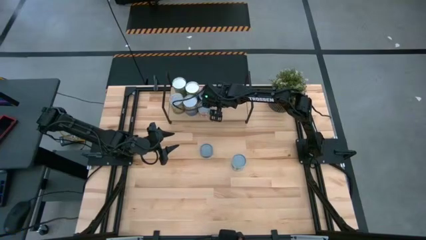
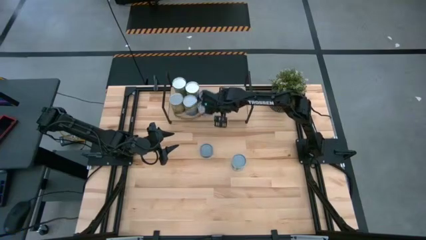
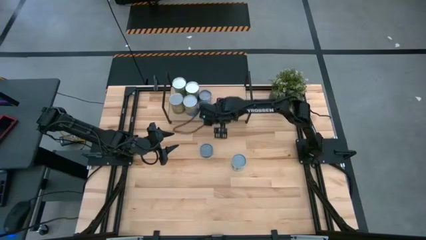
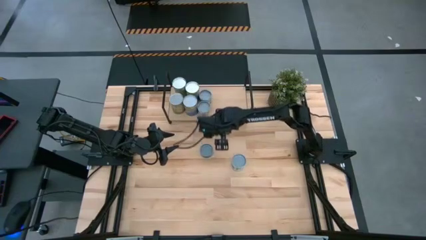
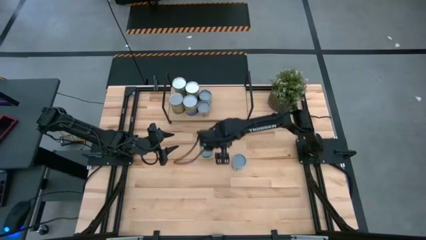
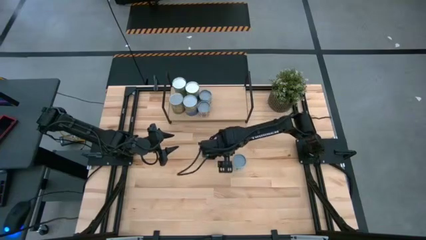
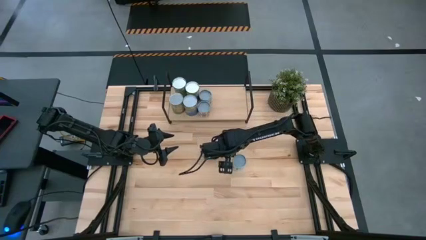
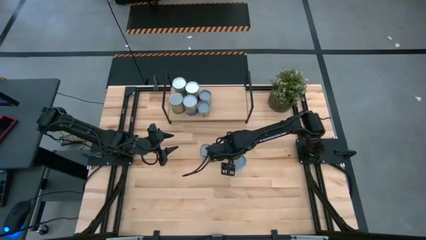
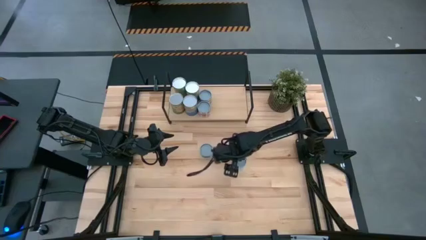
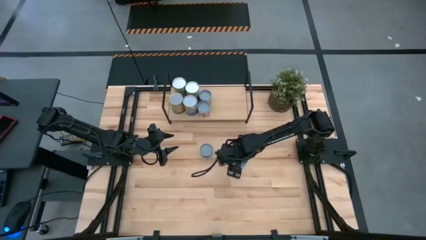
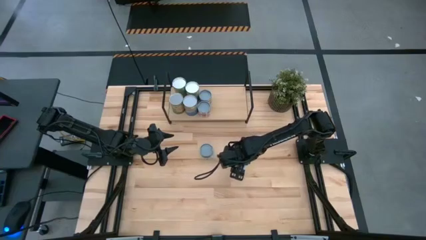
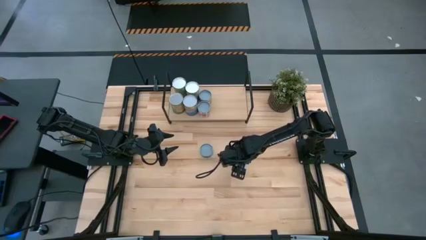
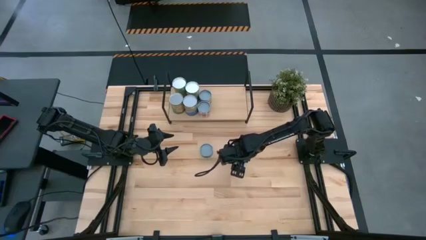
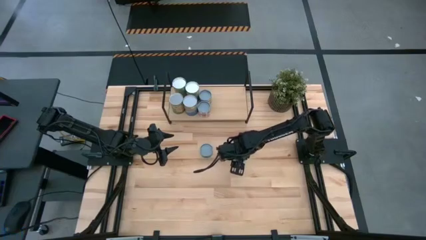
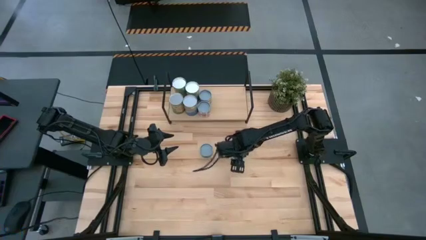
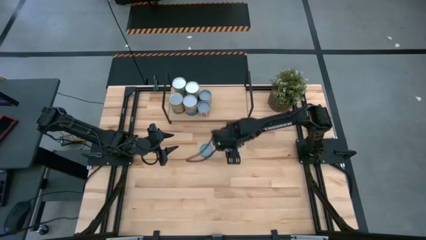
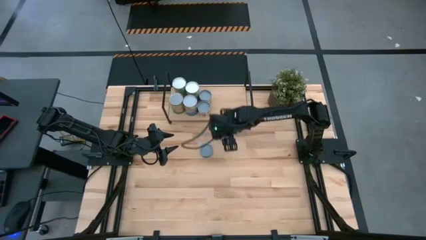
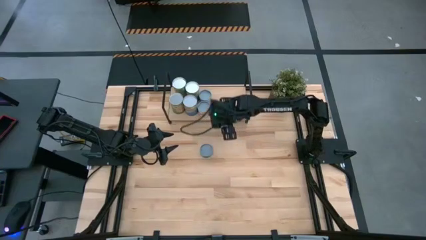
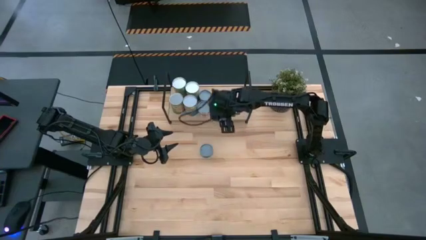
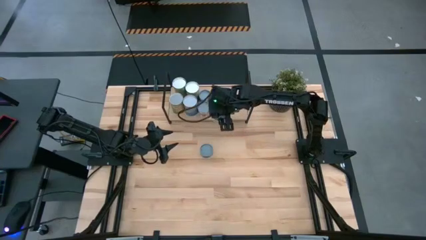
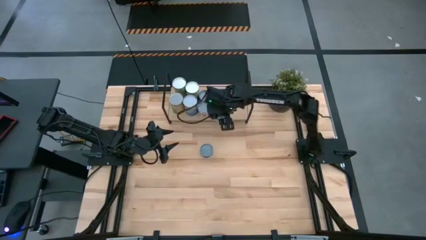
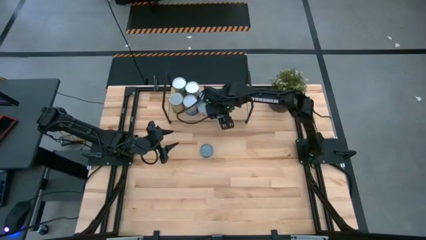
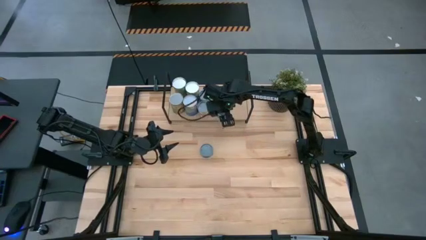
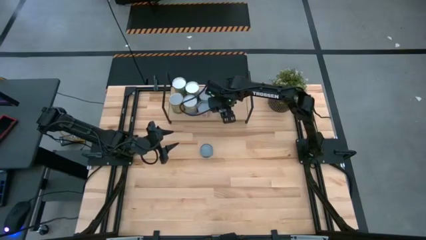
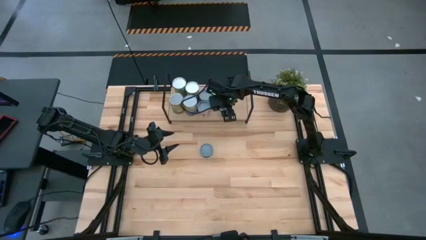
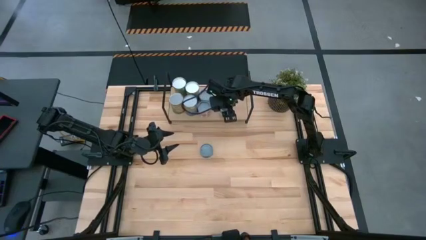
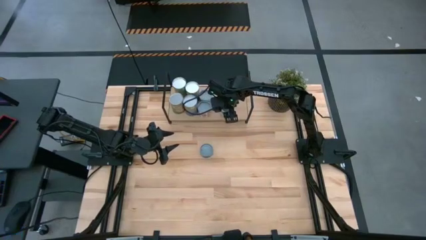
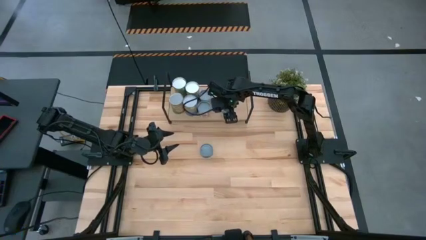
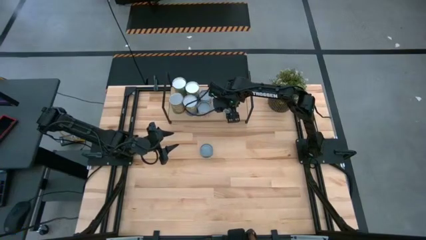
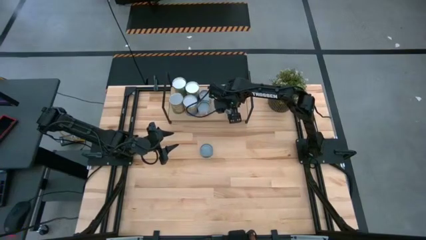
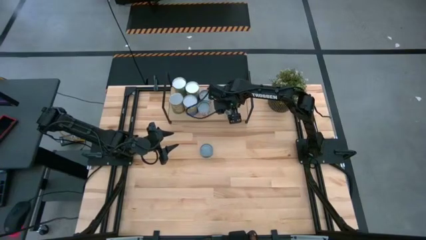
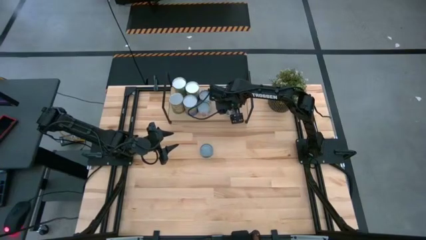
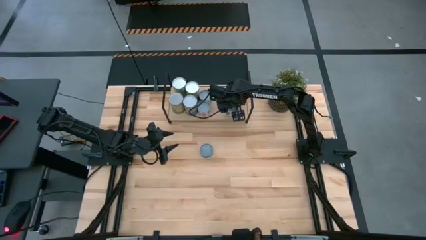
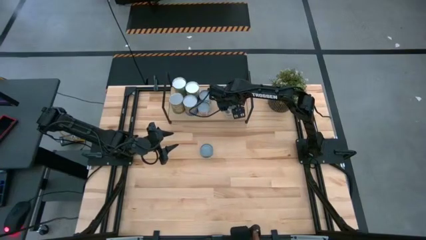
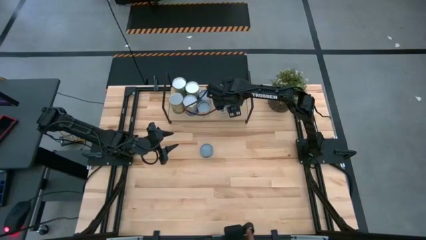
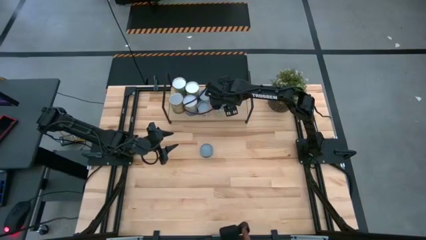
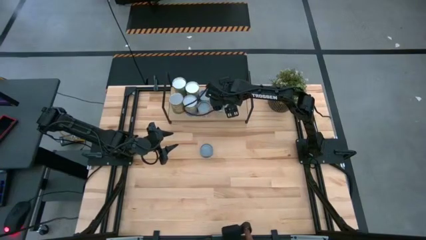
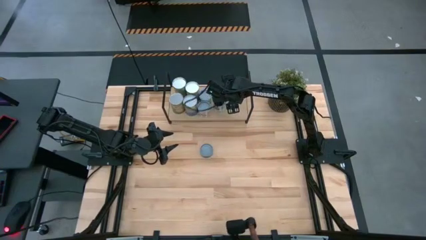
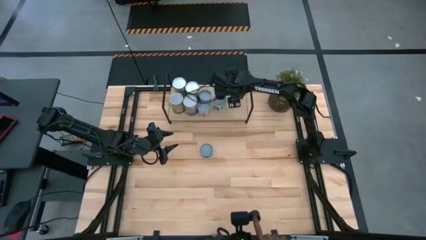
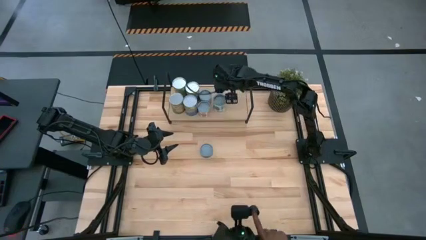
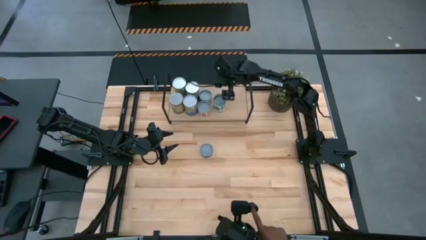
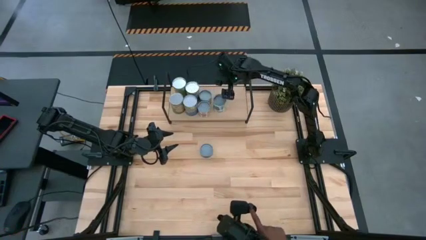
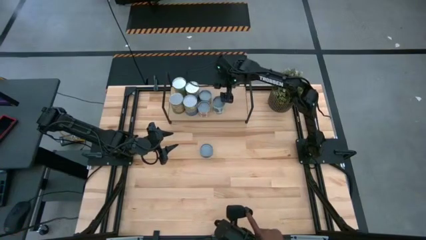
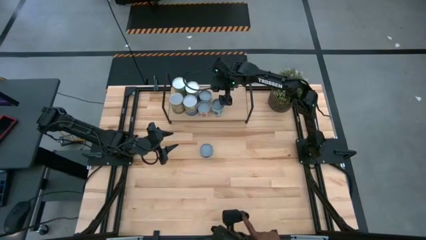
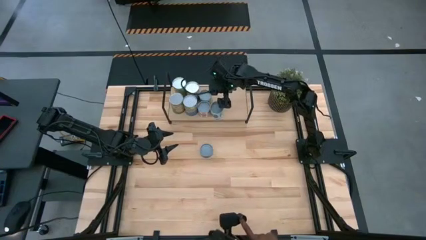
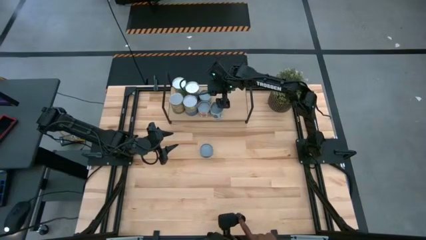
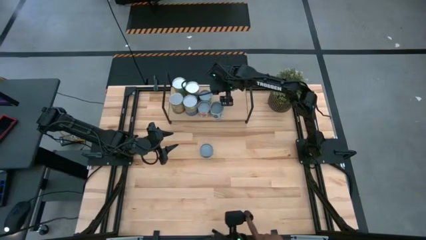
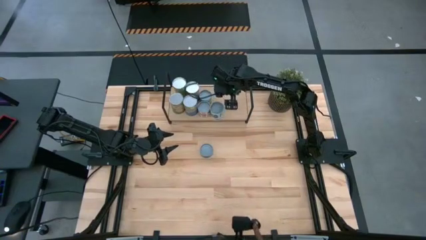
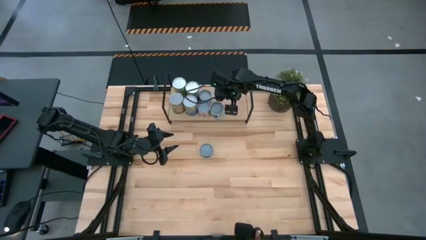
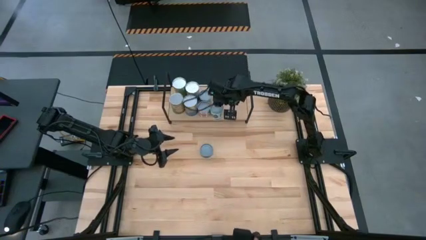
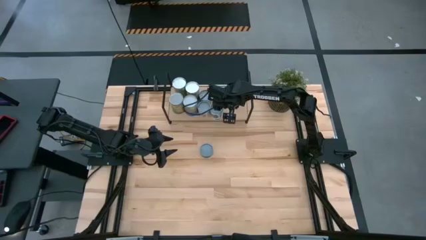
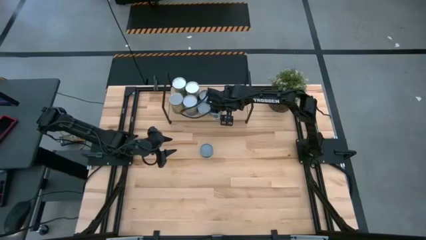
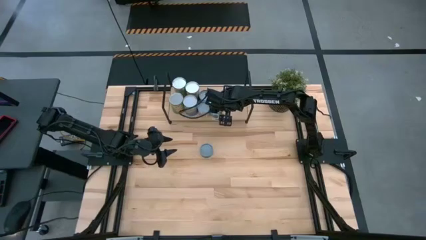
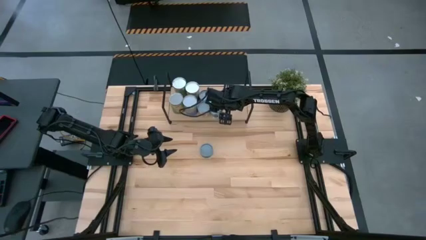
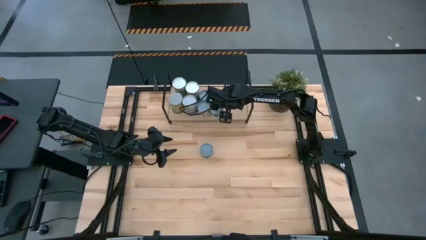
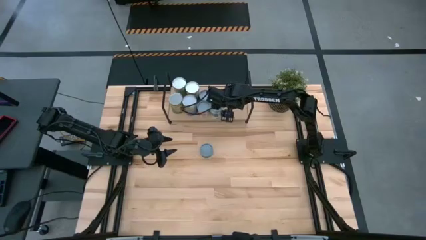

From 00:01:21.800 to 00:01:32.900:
Task: Pick and place cans onto a shelf
Put the canned mixed vegetables on the shelf
